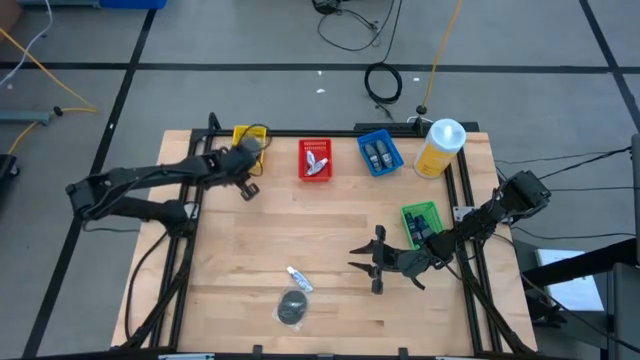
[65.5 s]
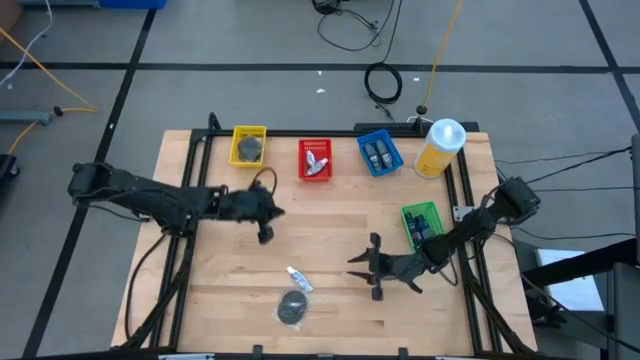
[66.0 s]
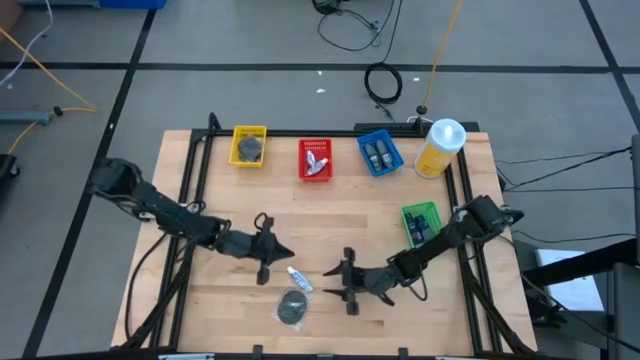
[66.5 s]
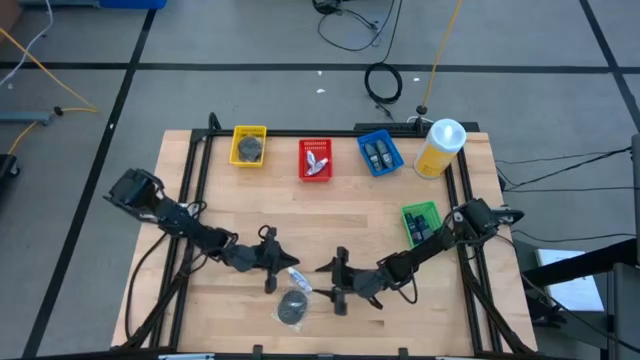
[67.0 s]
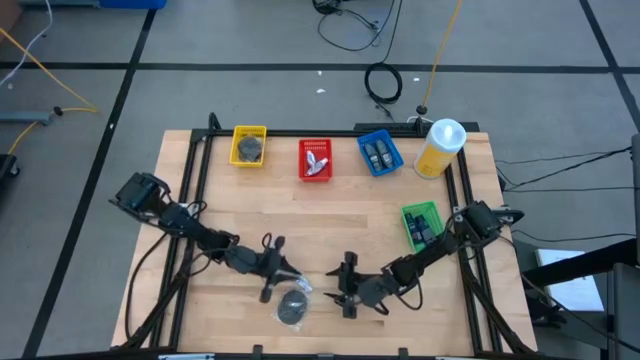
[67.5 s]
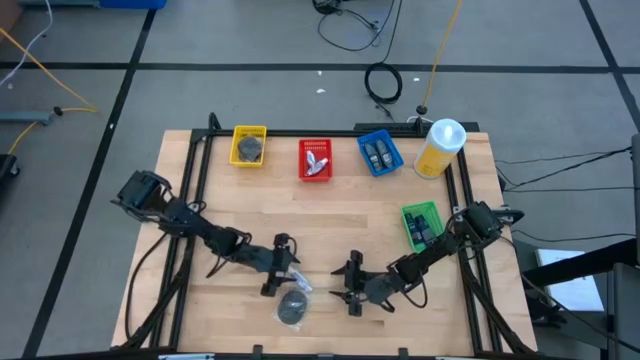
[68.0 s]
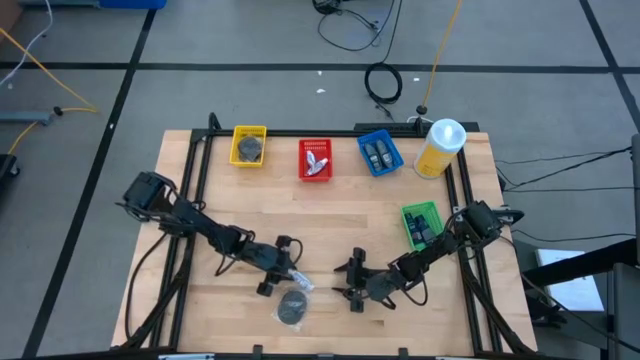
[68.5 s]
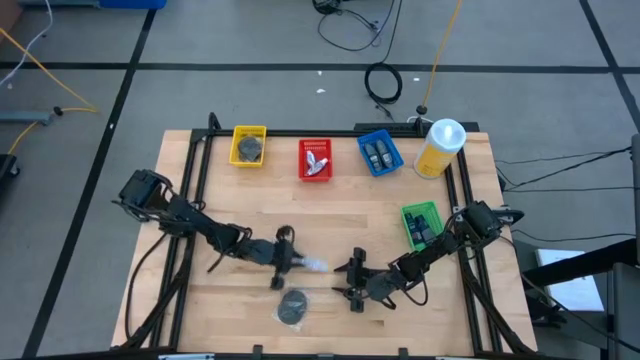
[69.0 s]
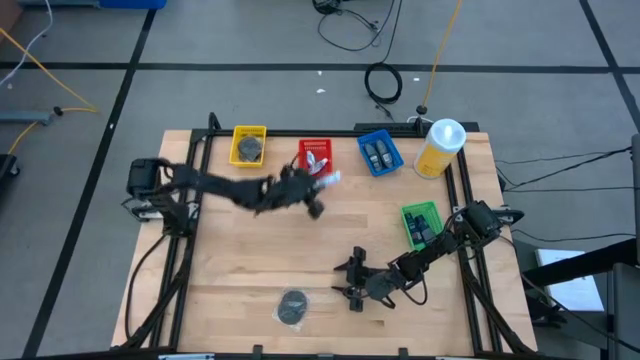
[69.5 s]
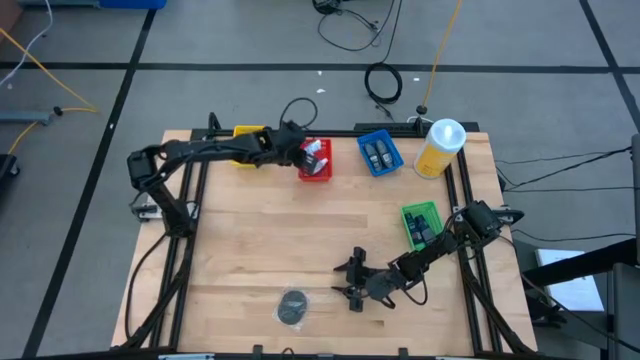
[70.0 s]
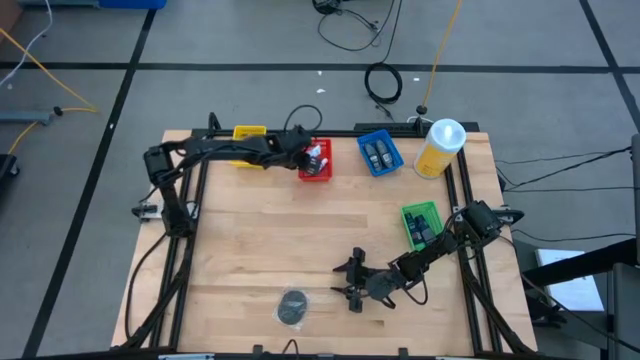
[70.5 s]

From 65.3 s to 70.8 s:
Task: Pick & Place Travel size toiletries
Put the white toothpaste into the red bin

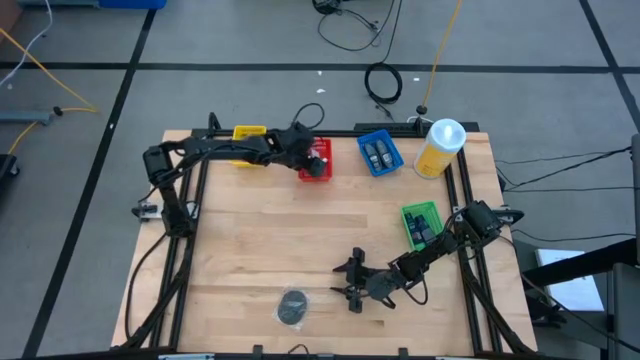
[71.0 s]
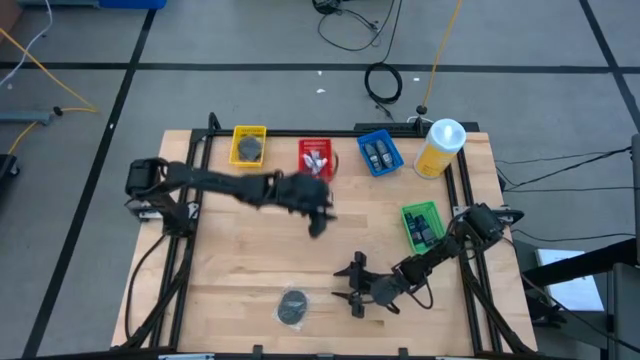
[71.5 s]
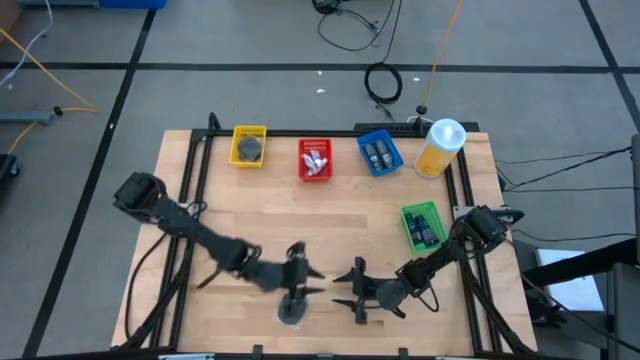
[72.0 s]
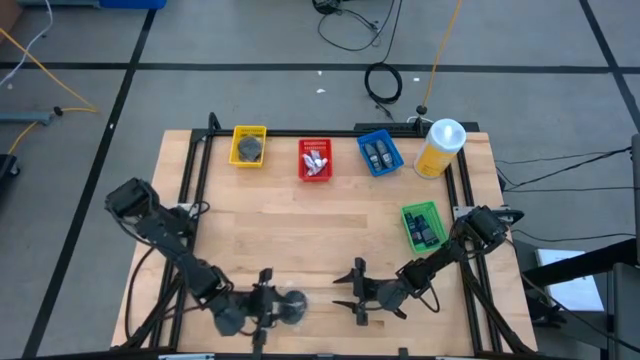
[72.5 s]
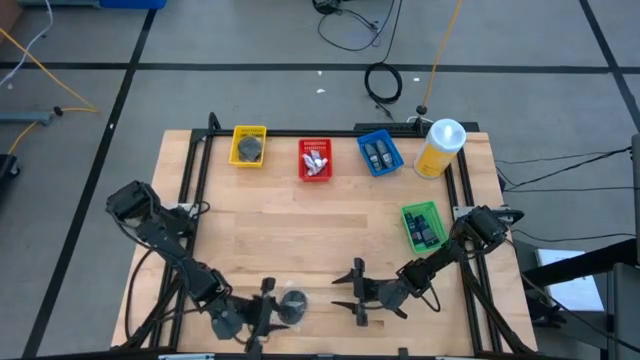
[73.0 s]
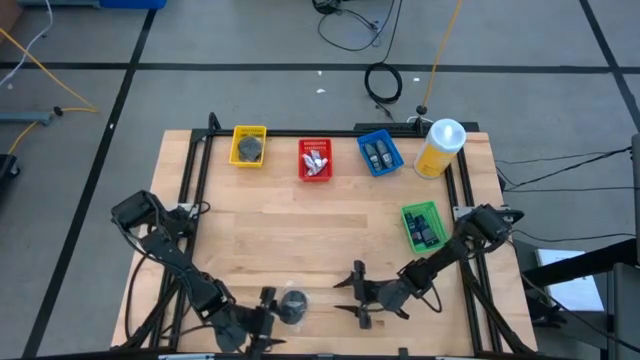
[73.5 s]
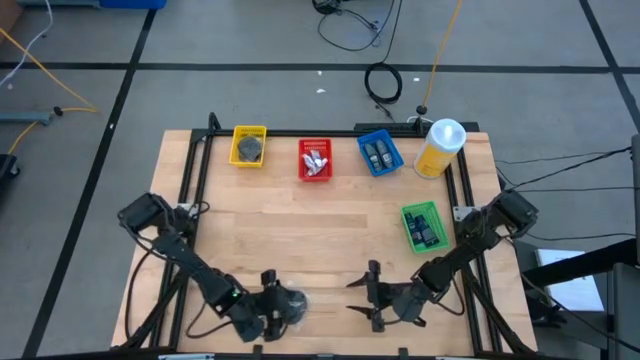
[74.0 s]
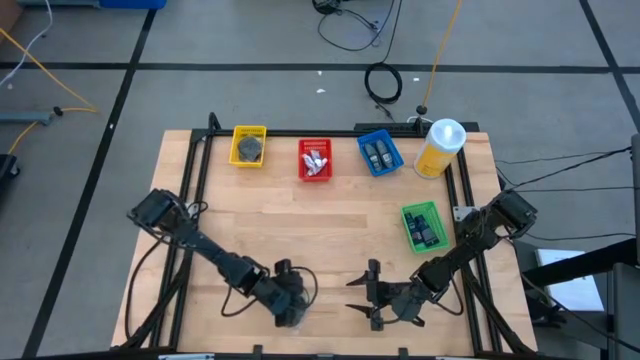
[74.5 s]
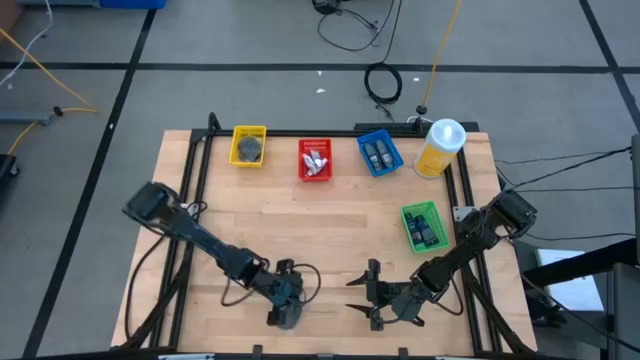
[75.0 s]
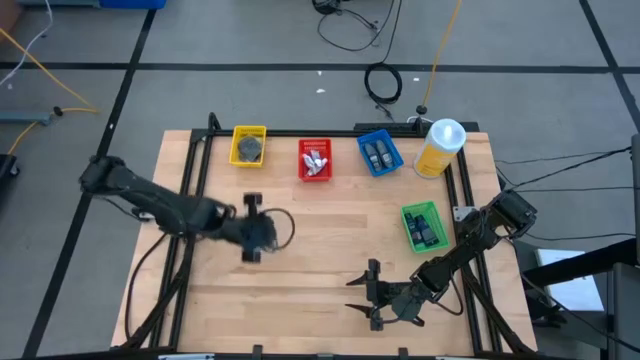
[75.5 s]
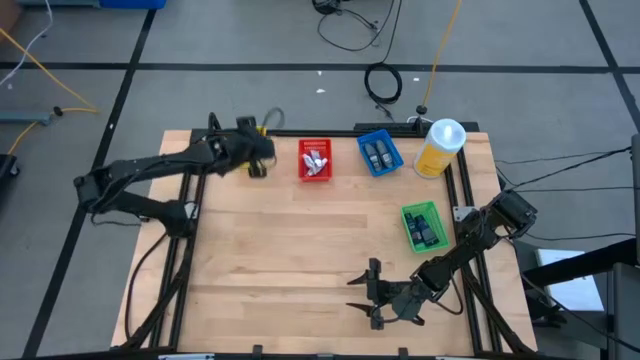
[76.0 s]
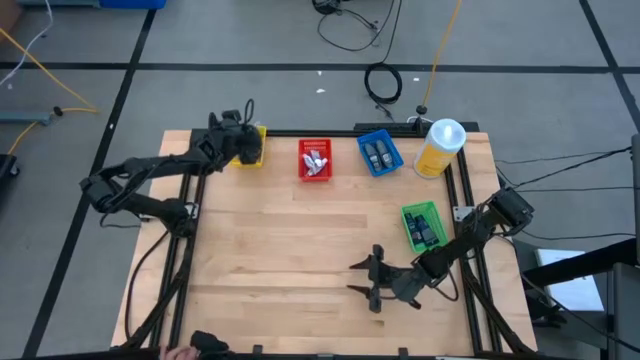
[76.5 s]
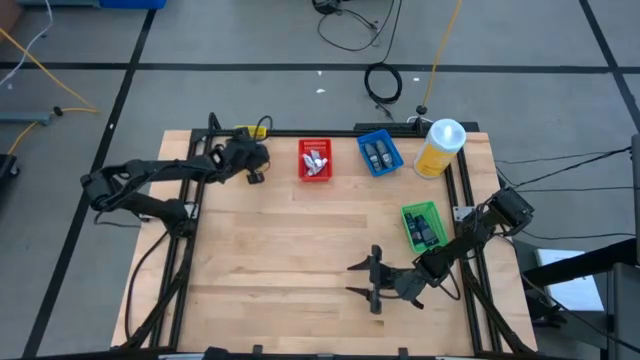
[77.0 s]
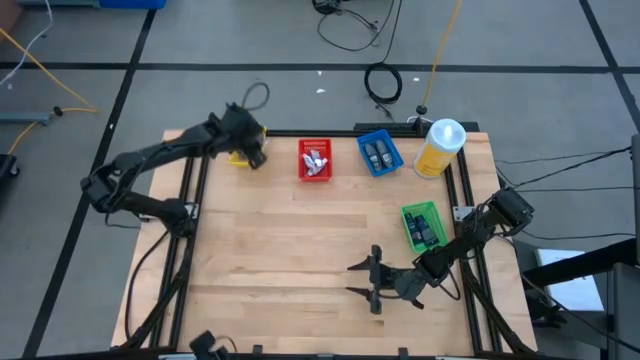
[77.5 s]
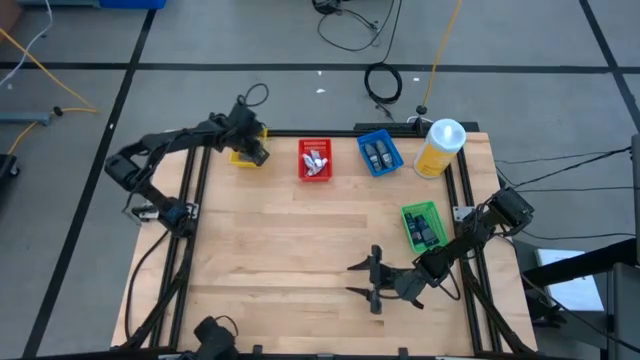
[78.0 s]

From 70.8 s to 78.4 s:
Put the black hairbrush into the yellow bin

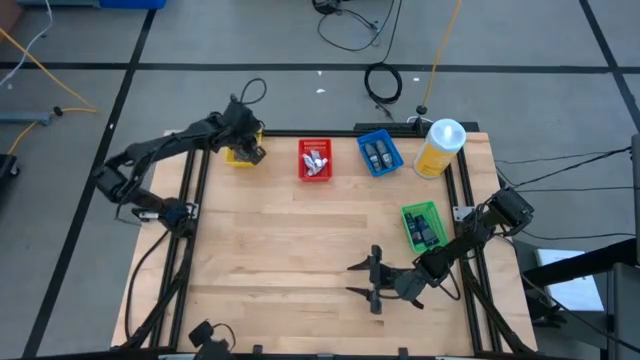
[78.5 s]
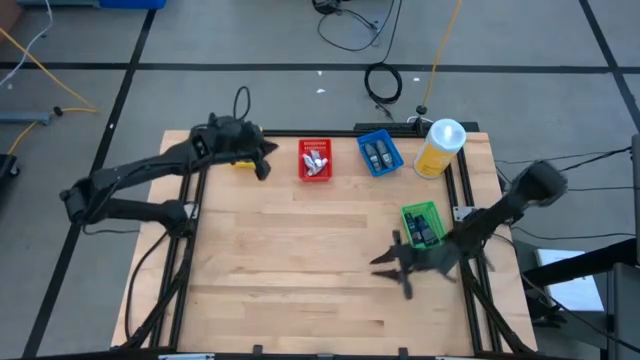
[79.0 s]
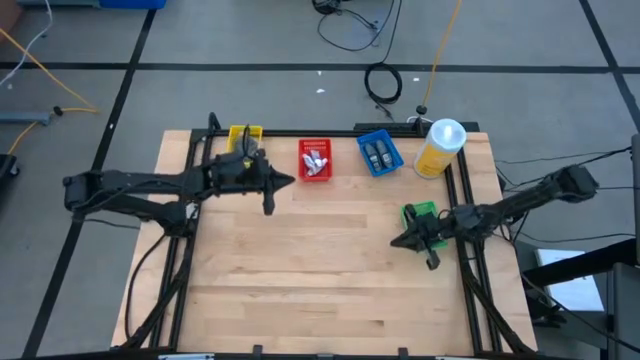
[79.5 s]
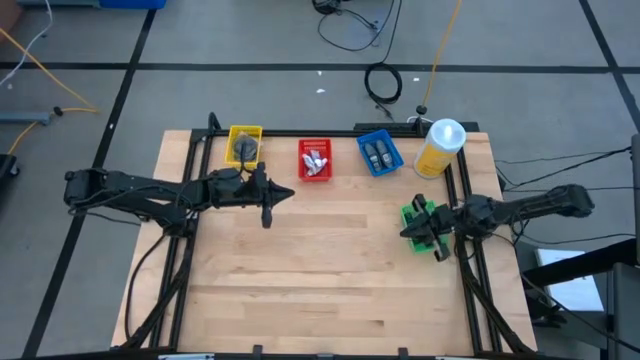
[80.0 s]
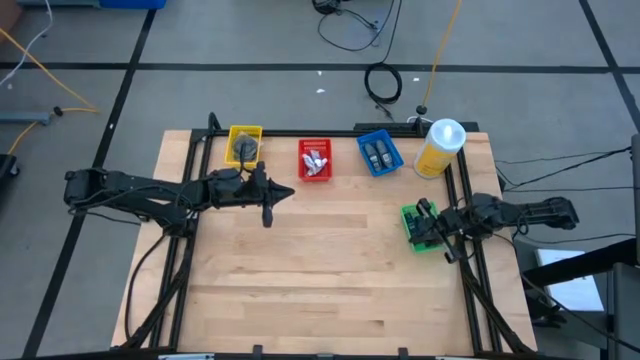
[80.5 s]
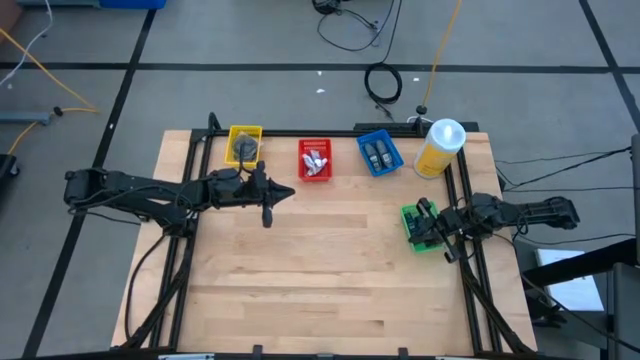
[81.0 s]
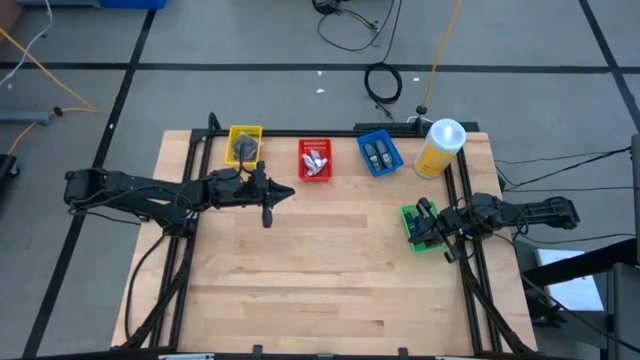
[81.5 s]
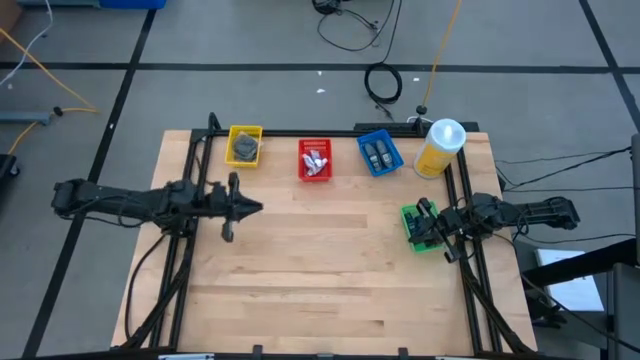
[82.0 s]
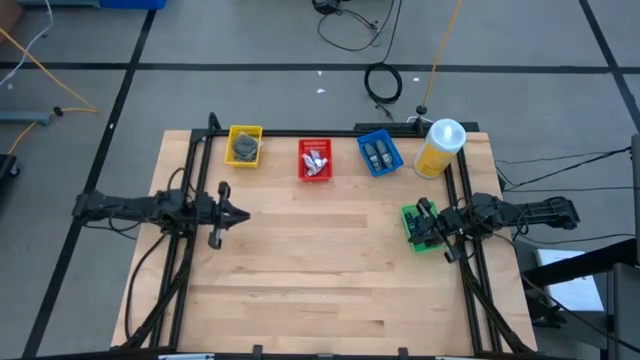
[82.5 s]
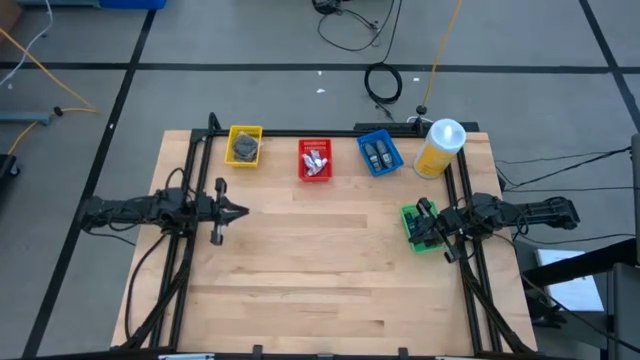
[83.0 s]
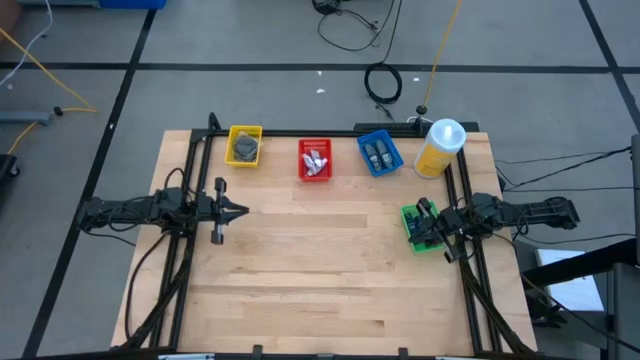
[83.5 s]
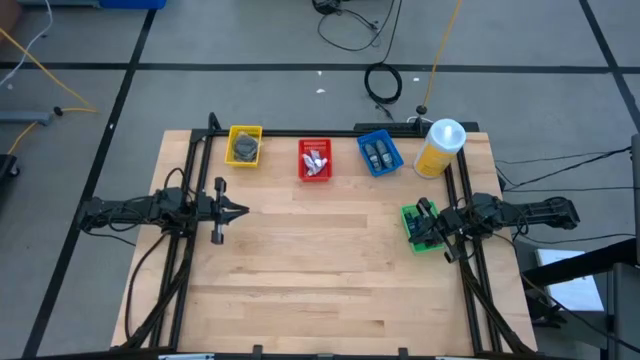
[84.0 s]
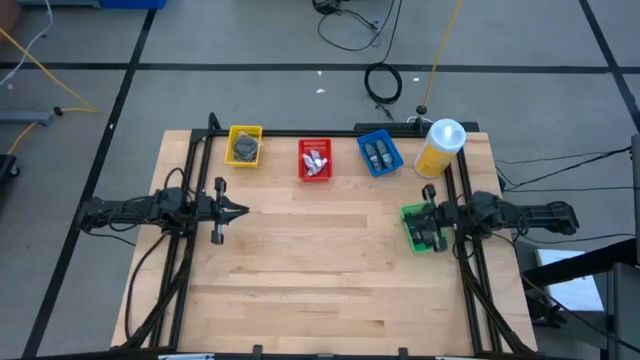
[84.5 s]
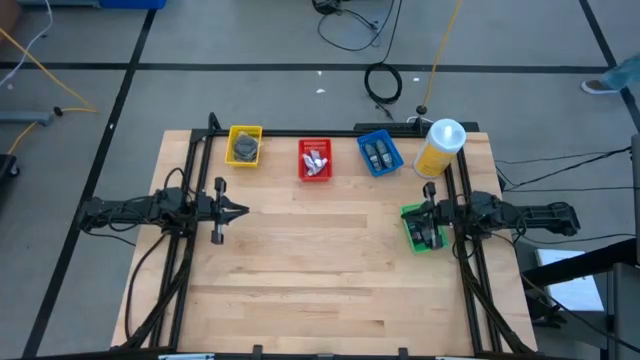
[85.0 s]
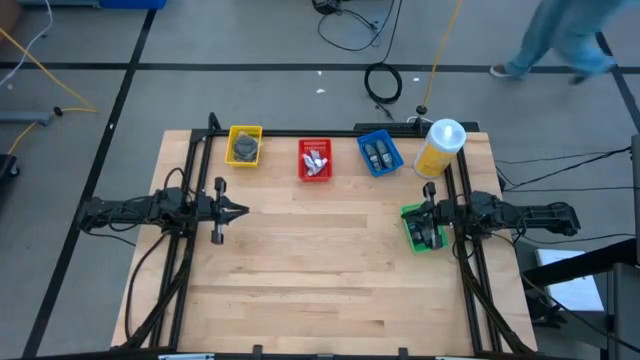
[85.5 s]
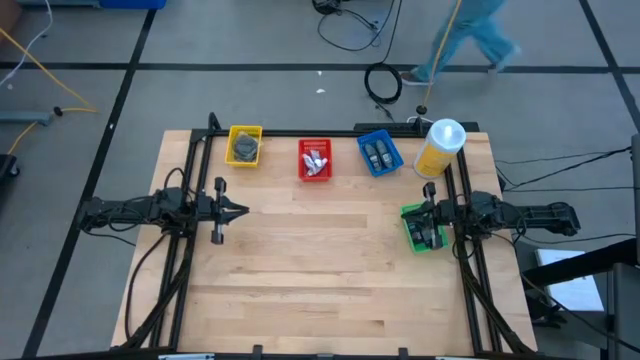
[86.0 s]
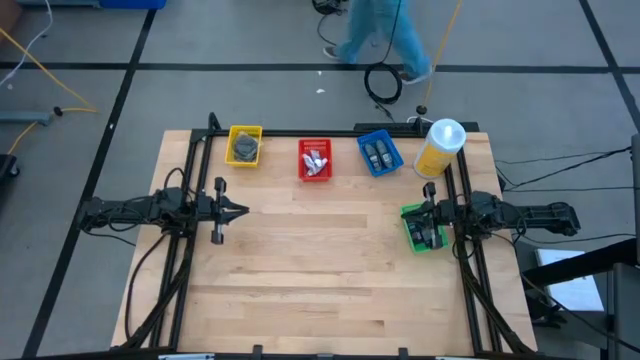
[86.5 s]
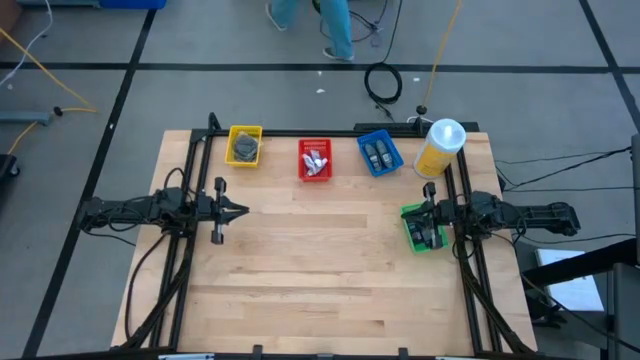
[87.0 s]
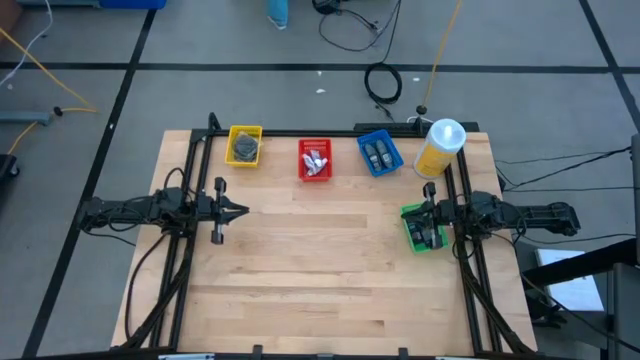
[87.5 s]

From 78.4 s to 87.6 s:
Return to Home Position
